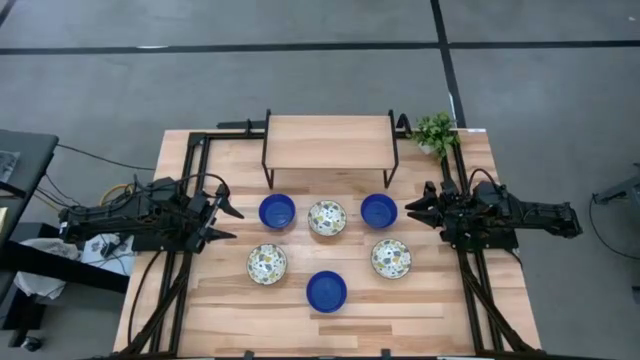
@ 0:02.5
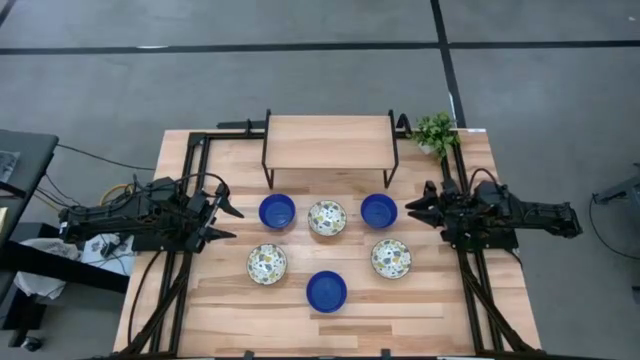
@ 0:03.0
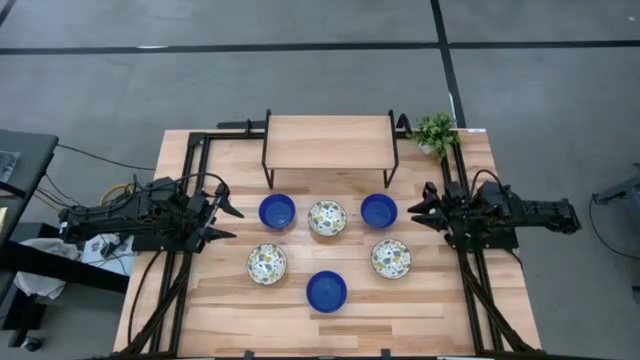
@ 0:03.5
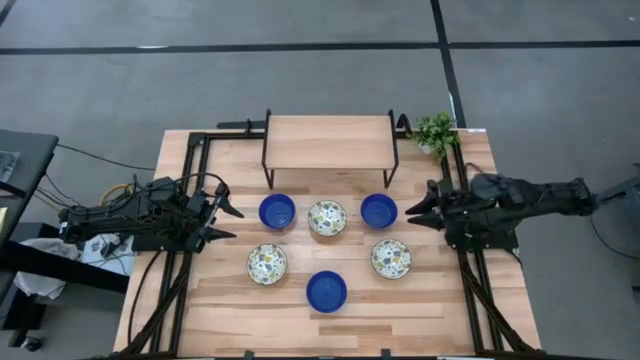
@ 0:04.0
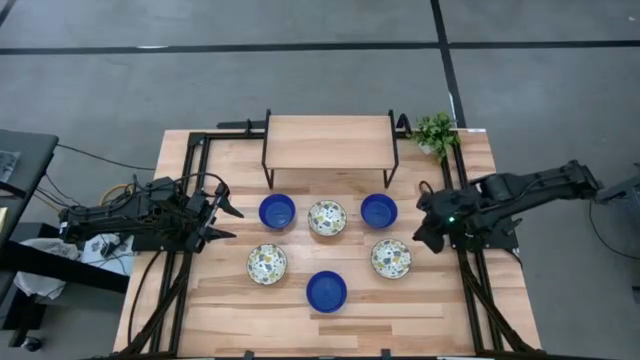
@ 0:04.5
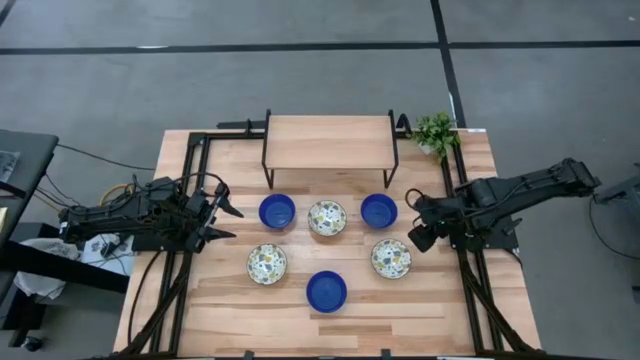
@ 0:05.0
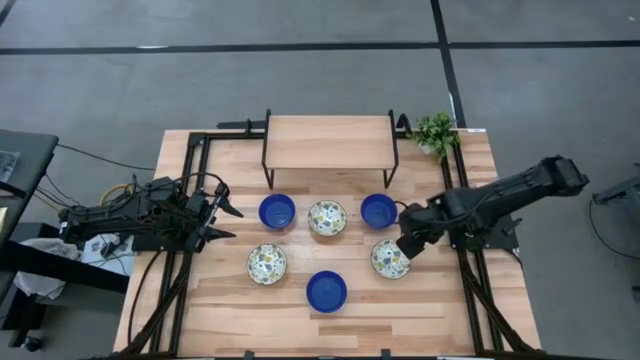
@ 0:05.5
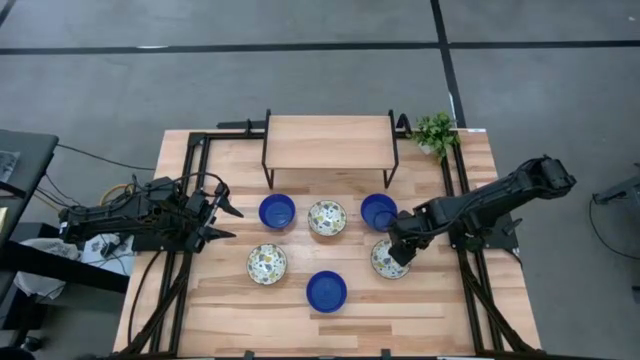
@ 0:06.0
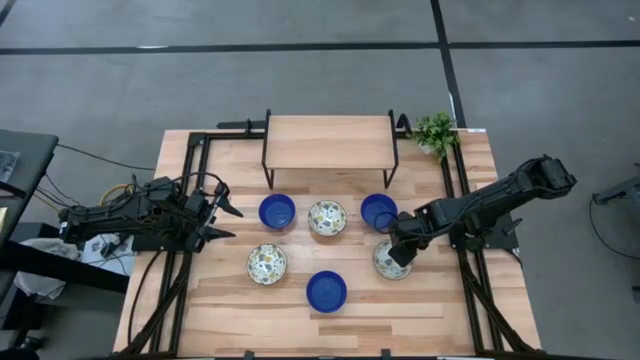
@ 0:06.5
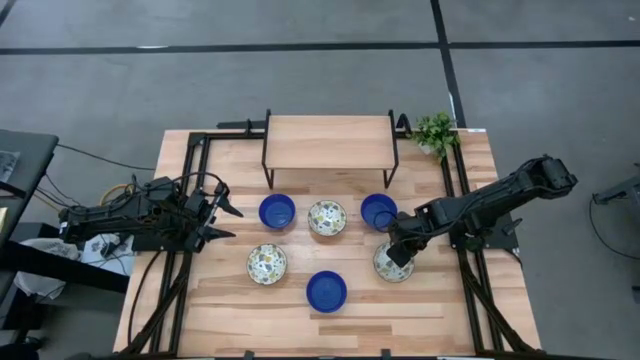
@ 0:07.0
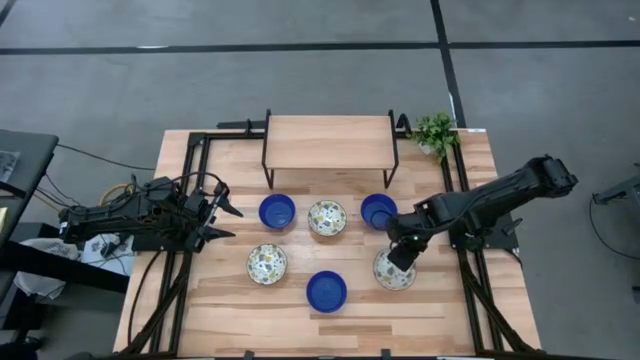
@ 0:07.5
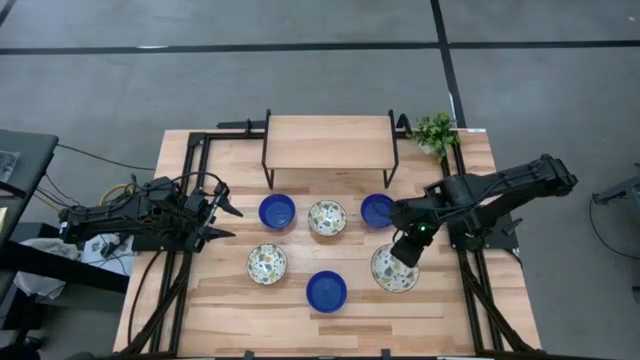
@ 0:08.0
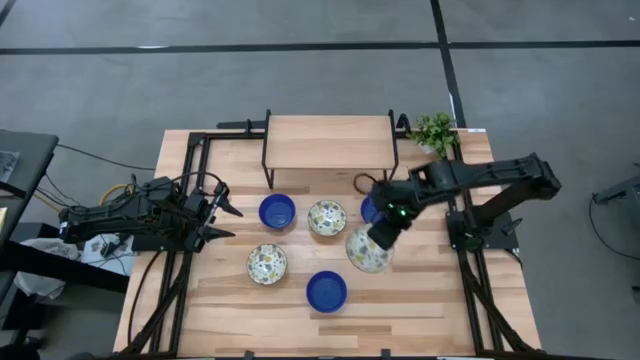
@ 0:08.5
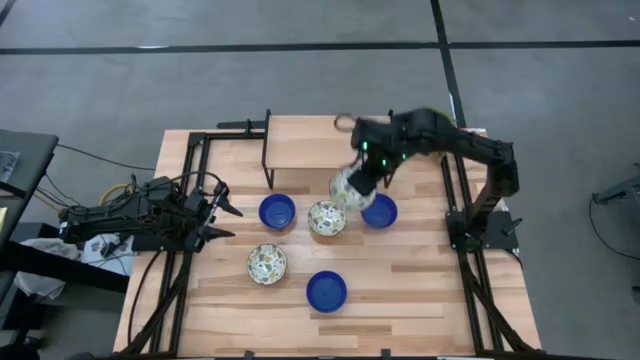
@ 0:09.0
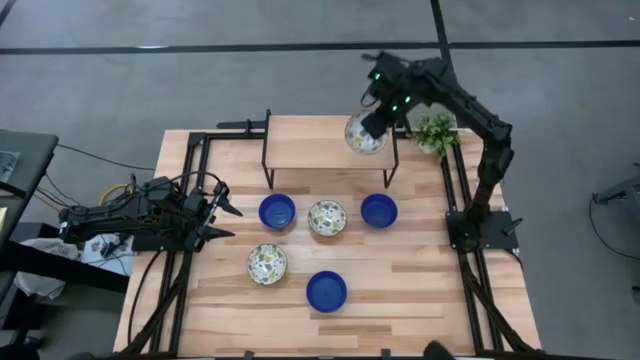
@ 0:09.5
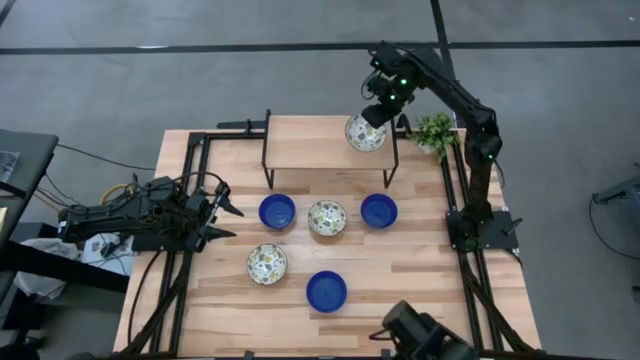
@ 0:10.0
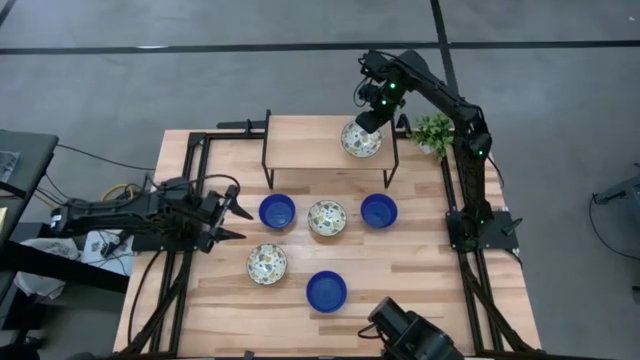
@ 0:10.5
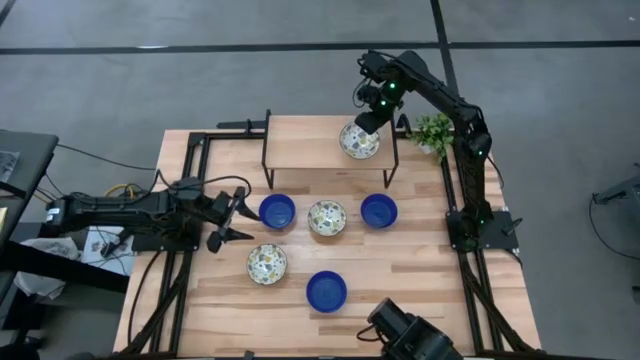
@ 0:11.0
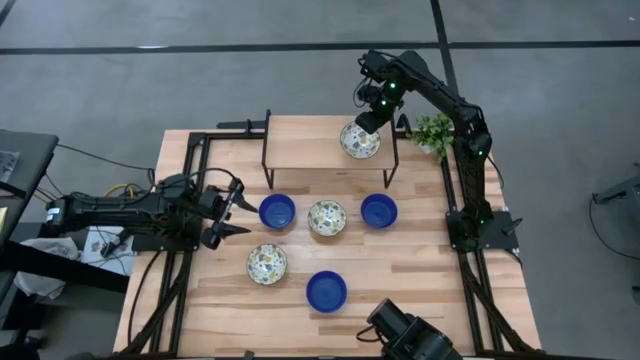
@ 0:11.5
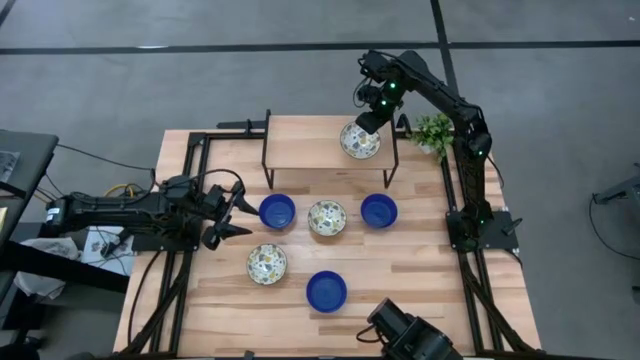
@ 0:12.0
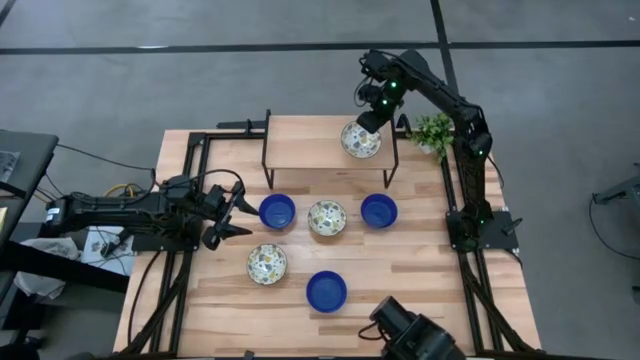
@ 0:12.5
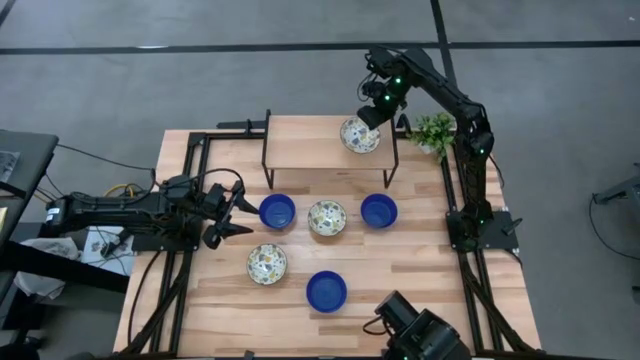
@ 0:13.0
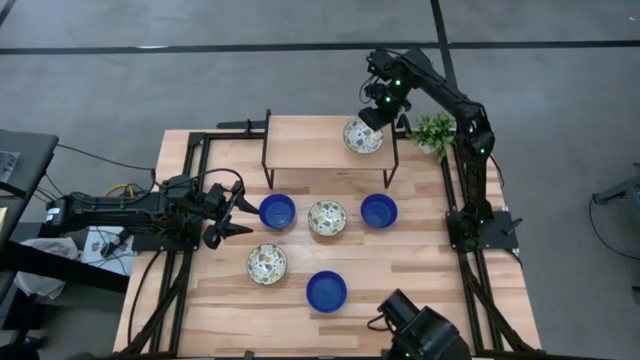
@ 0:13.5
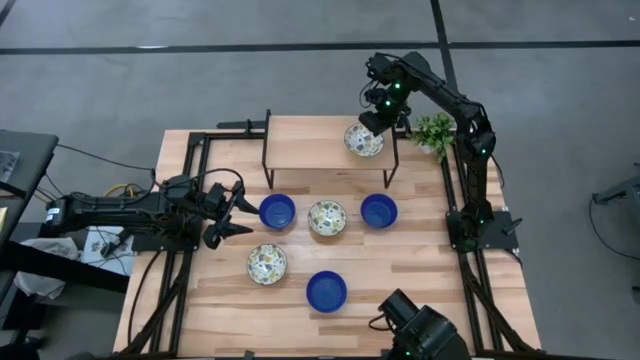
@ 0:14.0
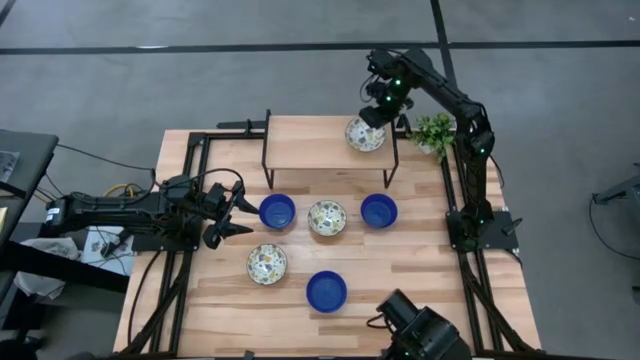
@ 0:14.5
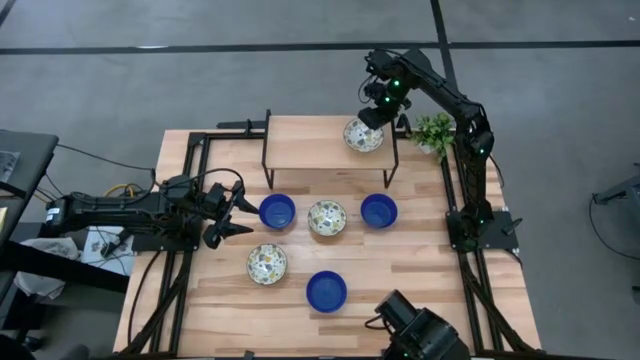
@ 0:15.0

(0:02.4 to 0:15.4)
Task: Pick & Place Mini bowls
Put the right white patterned bowl on the shelf

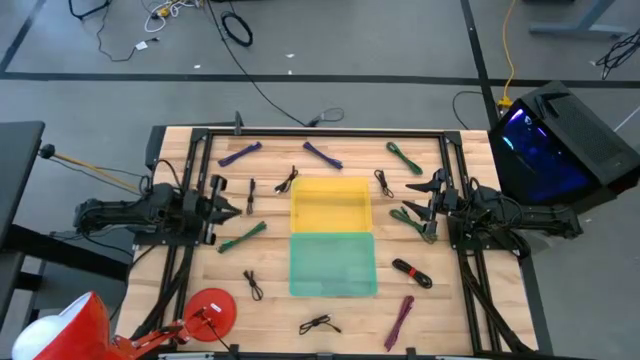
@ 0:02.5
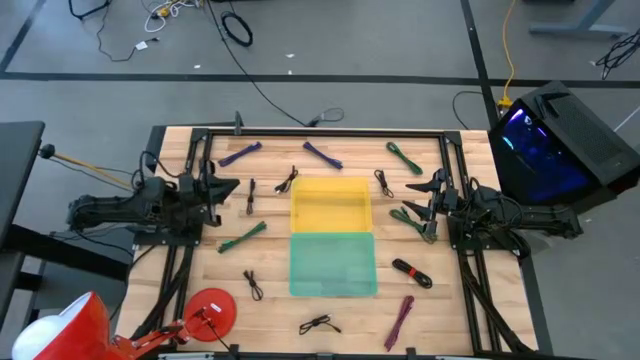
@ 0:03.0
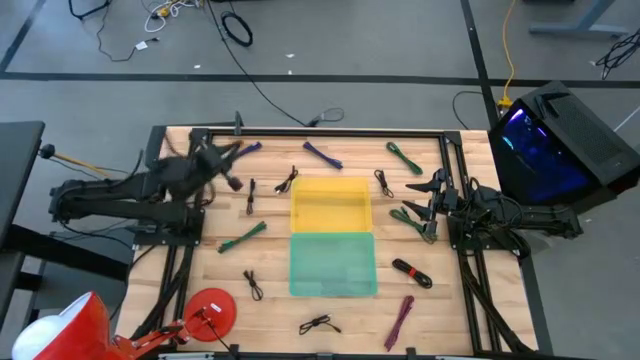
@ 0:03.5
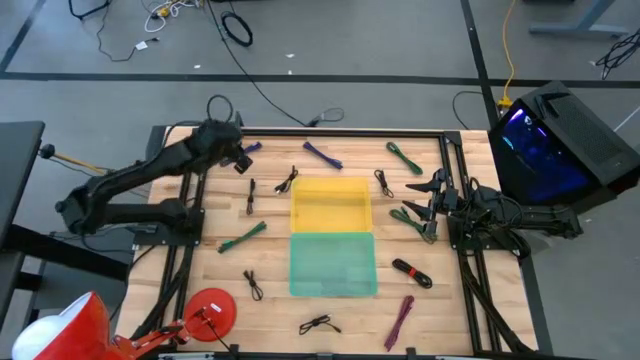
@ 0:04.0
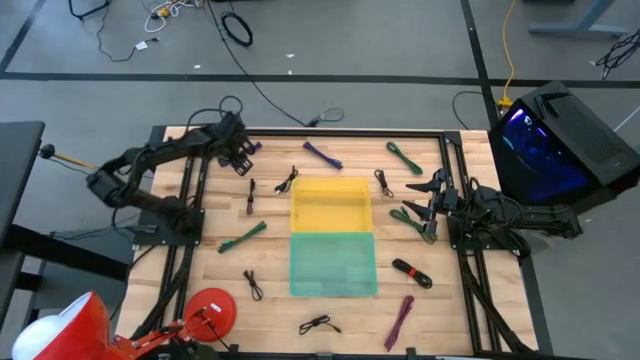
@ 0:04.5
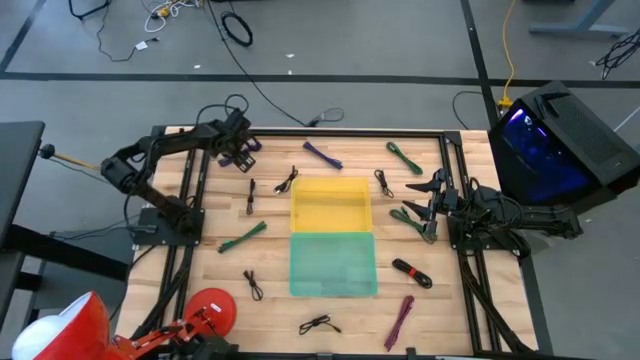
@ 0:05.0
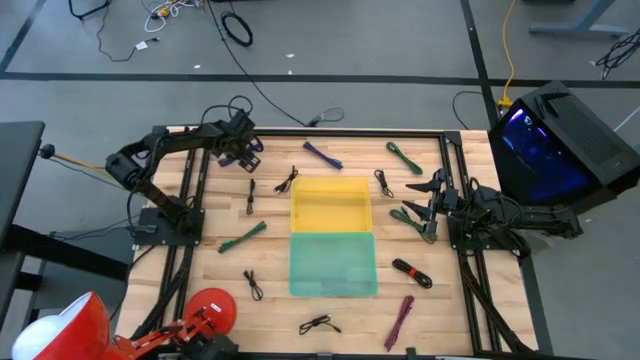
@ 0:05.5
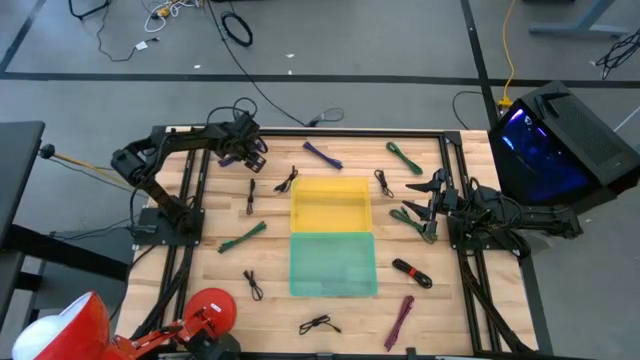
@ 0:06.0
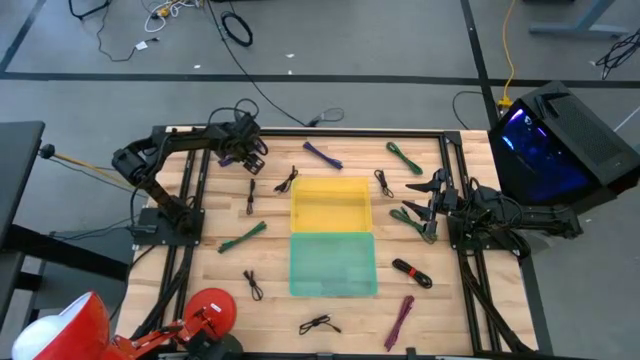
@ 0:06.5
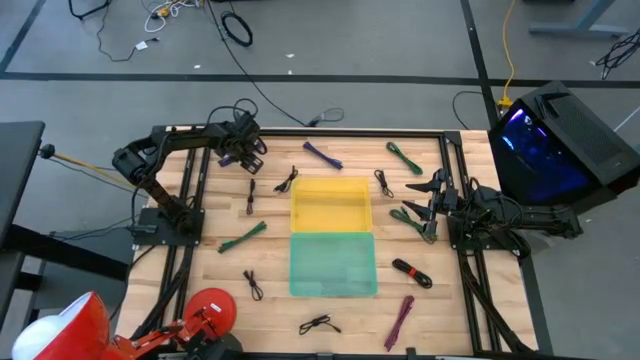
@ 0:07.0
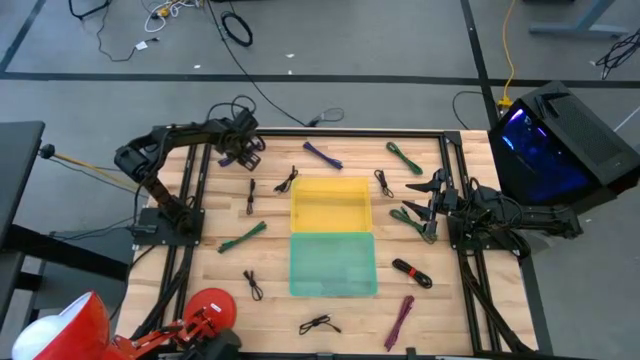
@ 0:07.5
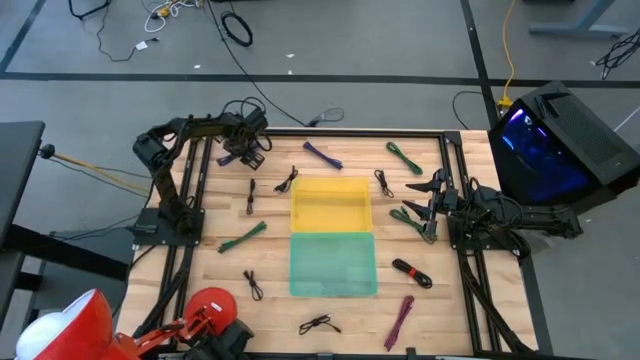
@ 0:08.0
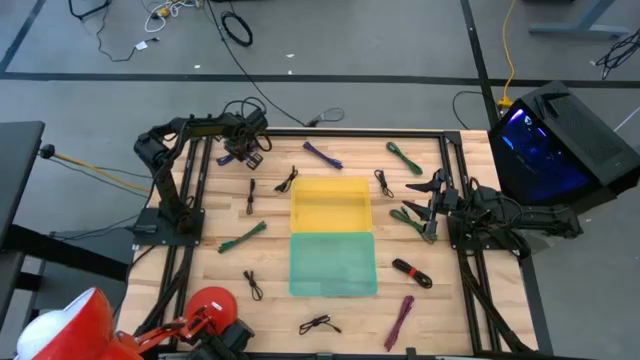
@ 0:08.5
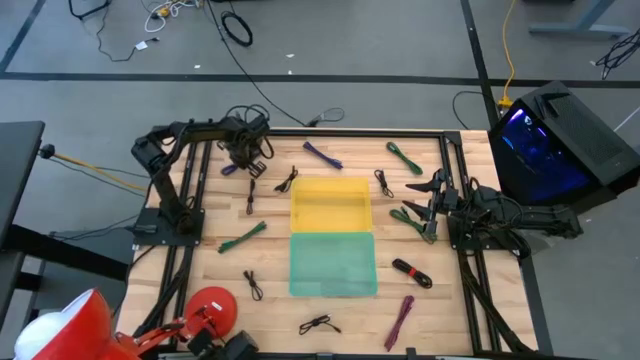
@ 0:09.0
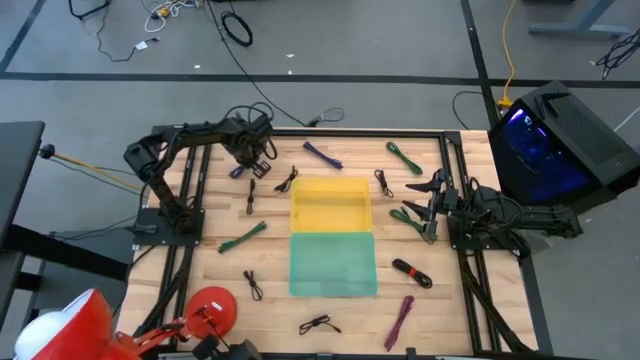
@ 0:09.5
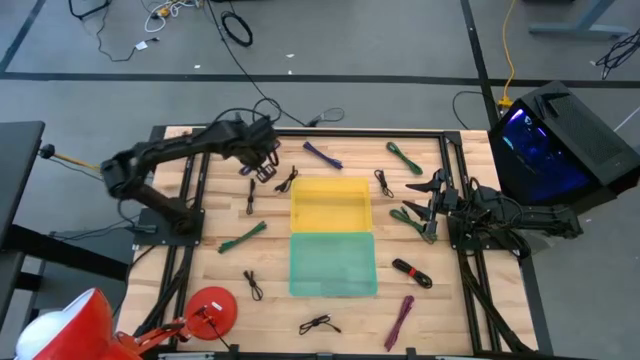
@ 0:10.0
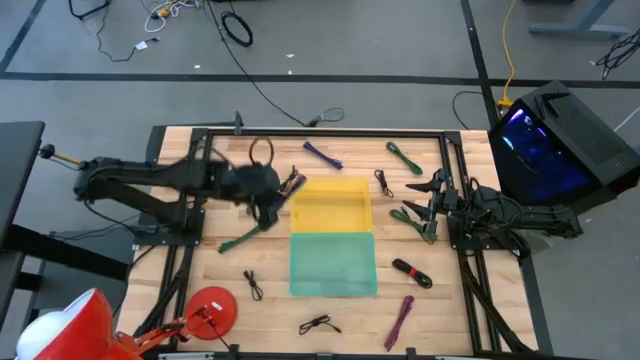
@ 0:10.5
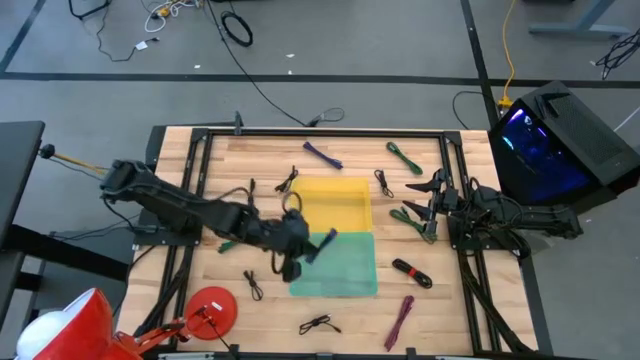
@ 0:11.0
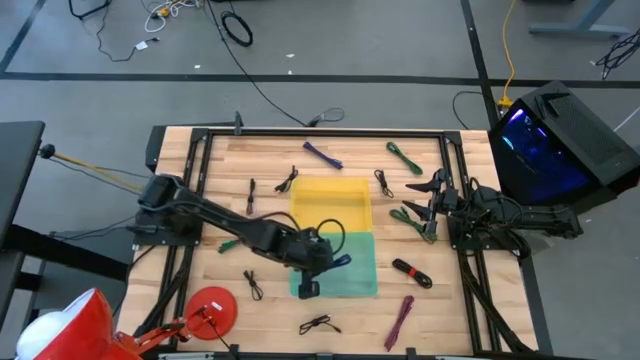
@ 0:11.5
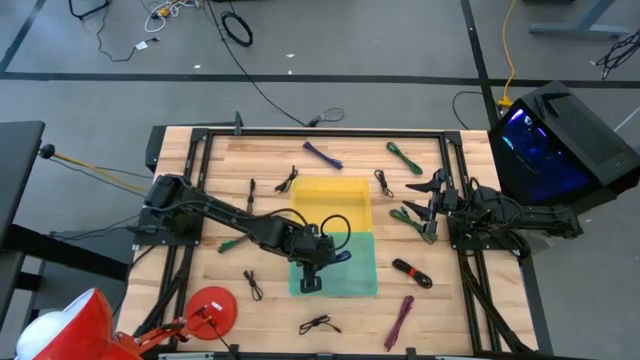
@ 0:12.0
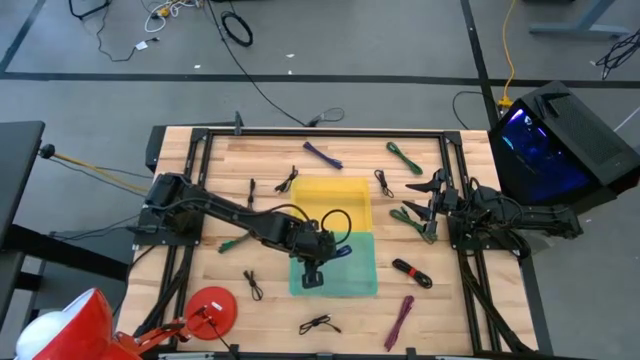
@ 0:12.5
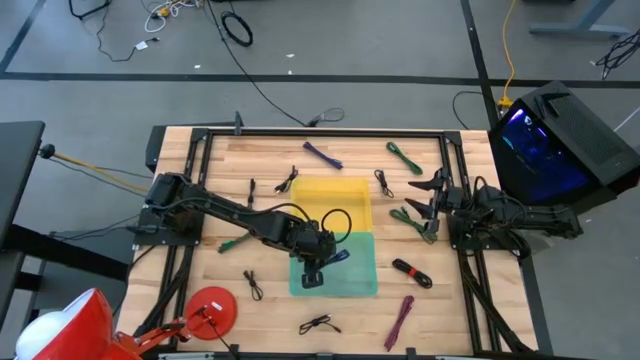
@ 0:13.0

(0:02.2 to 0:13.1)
Task: Pick & Place USB Port
Put the striped blue charger cable into the blue bin
